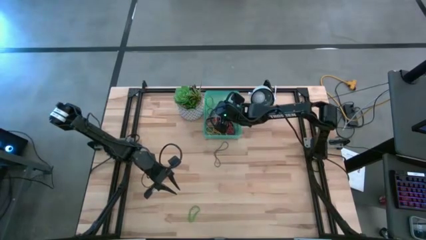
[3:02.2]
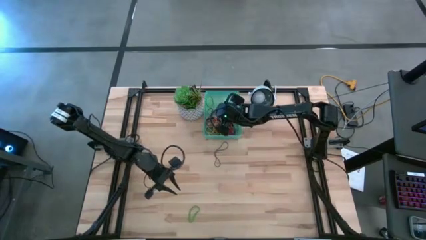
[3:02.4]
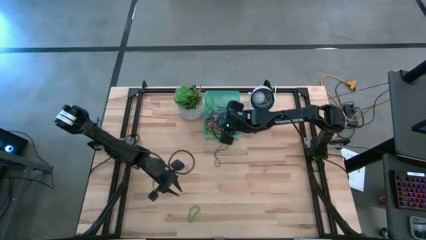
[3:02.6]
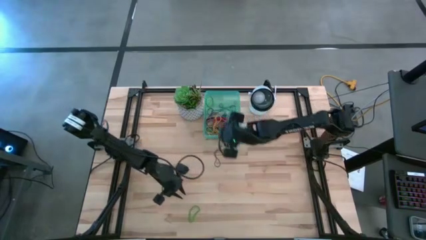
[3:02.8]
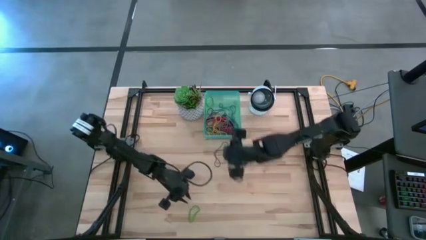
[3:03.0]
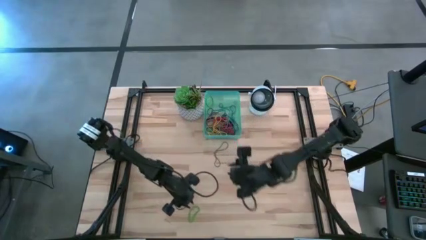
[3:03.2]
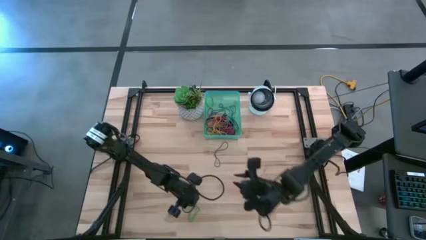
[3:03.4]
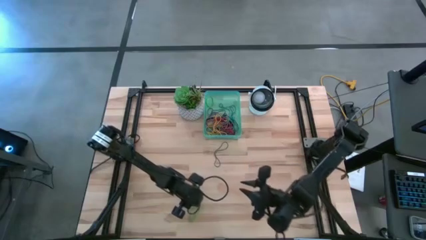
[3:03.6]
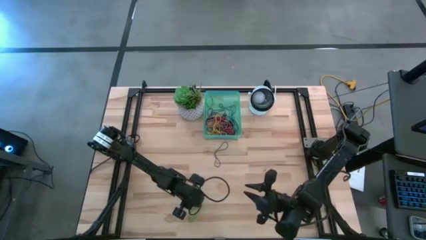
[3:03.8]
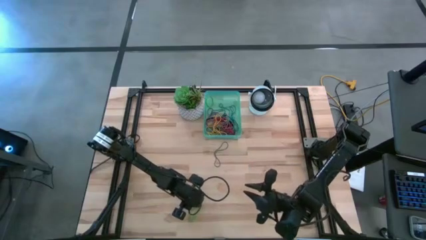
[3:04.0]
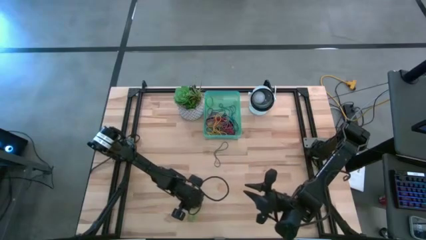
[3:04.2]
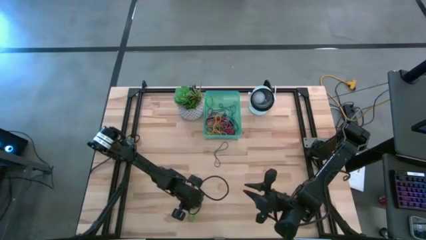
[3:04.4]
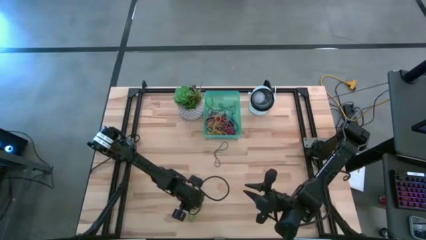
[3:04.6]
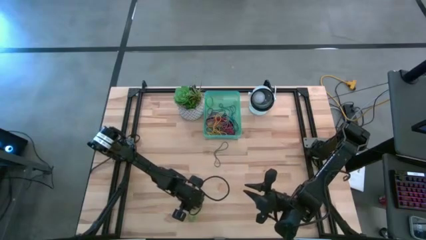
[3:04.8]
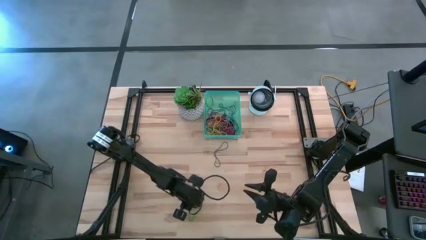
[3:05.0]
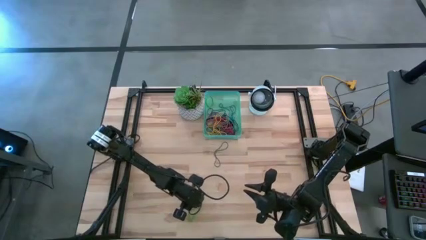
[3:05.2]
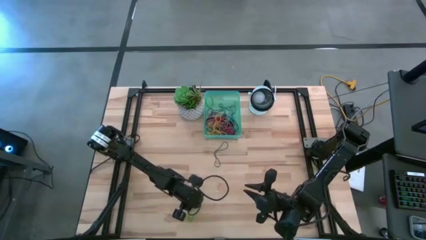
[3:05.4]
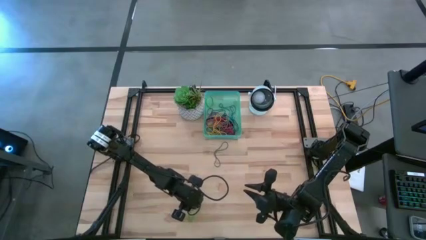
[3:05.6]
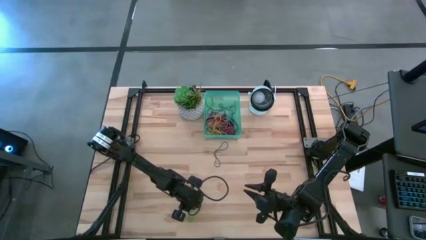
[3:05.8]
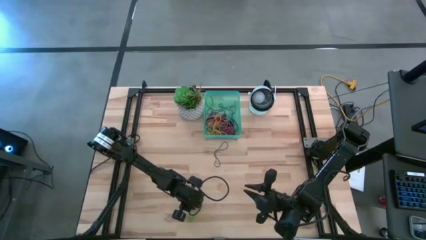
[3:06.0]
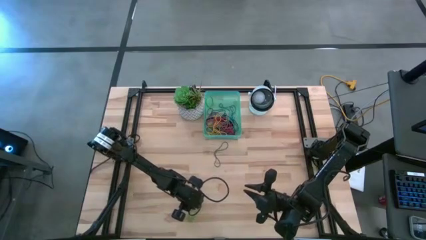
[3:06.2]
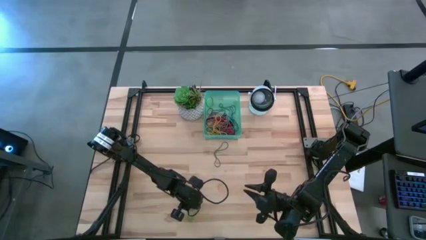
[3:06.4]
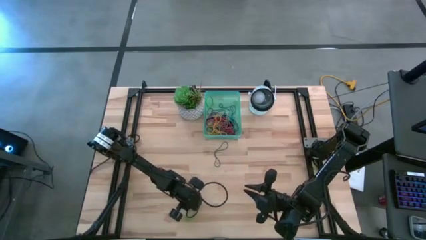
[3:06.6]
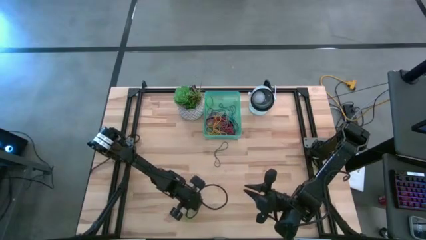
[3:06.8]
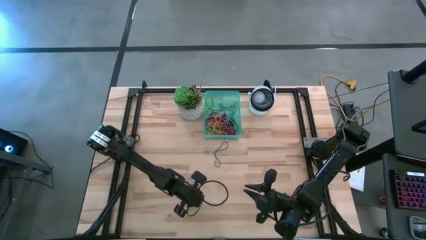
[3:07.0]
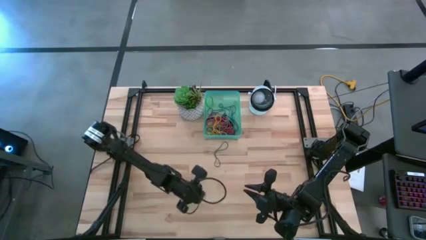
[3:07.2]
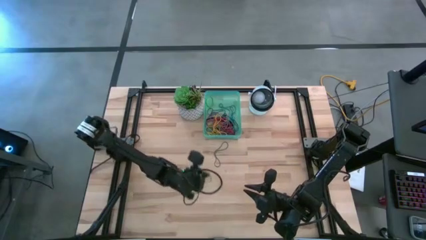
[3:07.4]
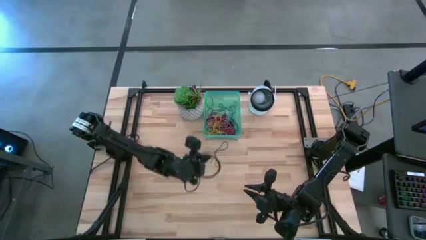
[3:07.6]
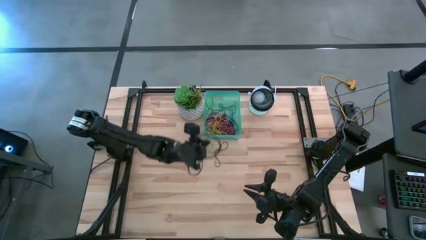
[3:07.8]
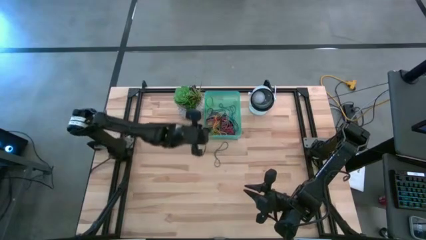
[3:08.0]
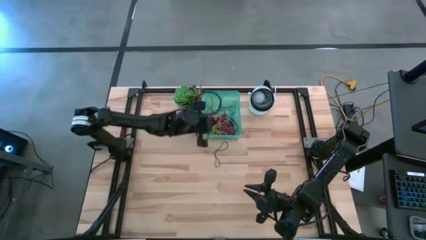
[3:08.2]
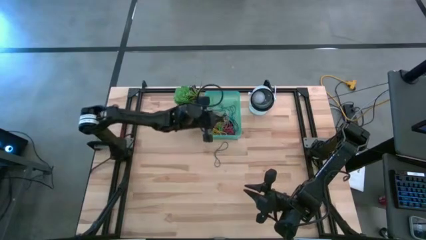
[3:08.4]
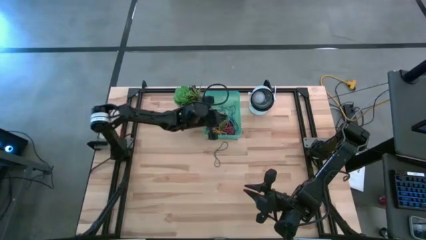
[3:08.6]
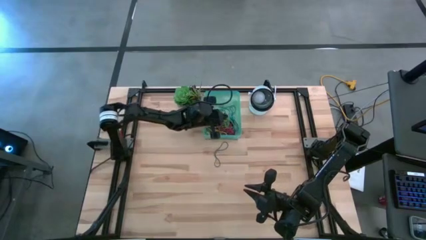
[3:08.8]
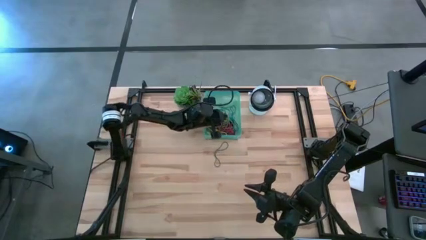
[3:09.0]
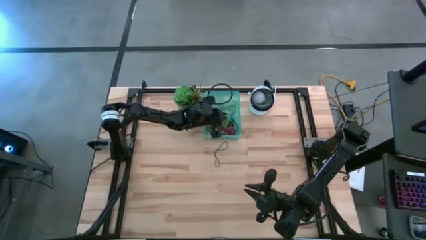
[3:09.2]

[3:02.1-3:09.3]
Task: Pick and place rubber bands into bin
Put the green rubber band into the green bin

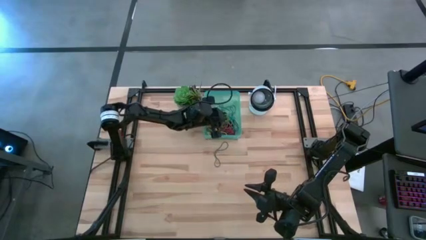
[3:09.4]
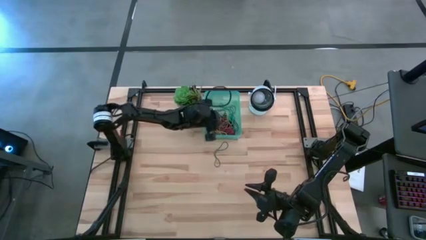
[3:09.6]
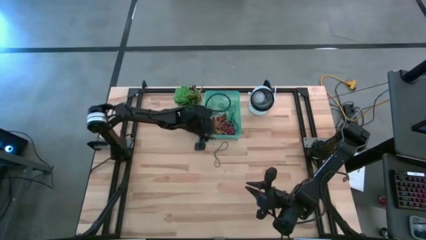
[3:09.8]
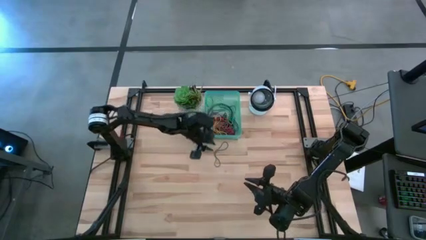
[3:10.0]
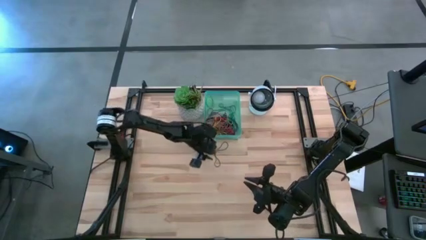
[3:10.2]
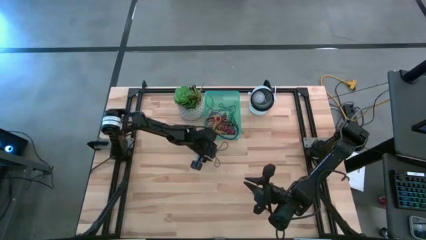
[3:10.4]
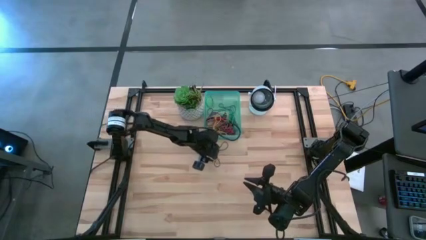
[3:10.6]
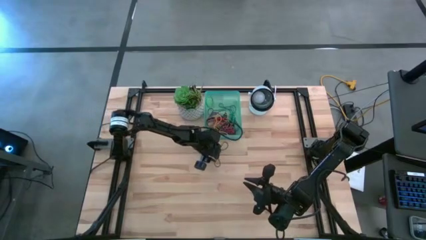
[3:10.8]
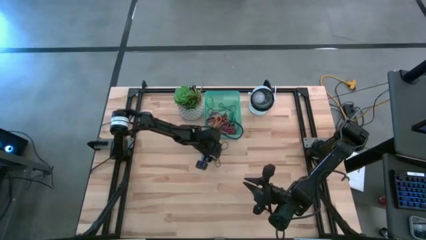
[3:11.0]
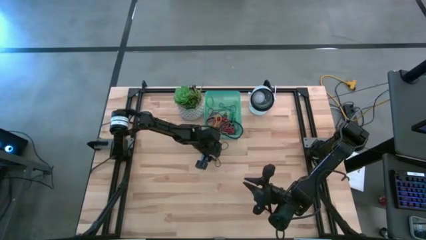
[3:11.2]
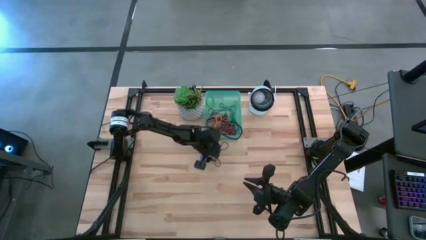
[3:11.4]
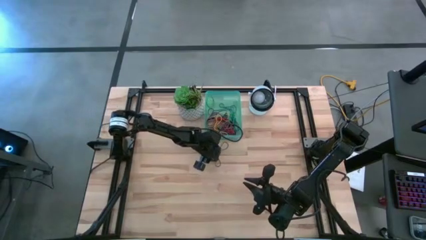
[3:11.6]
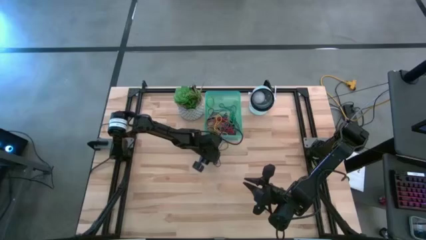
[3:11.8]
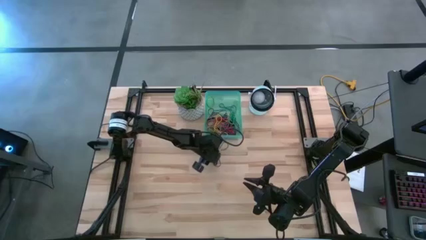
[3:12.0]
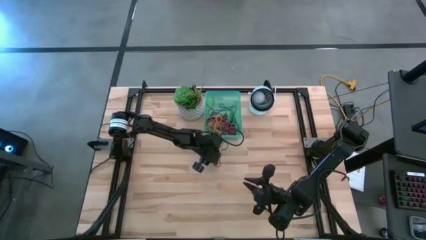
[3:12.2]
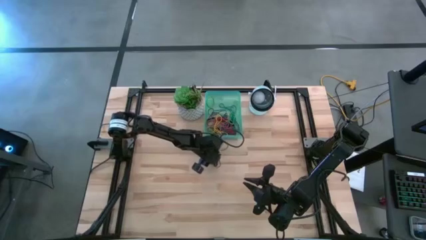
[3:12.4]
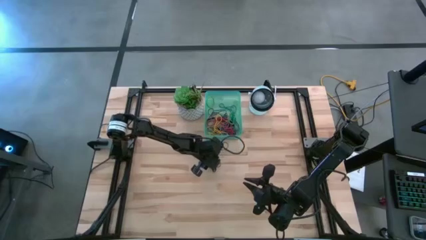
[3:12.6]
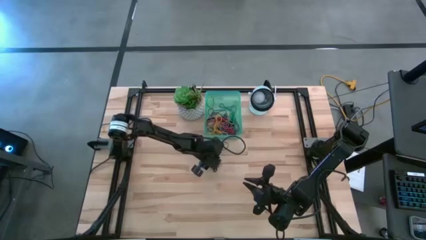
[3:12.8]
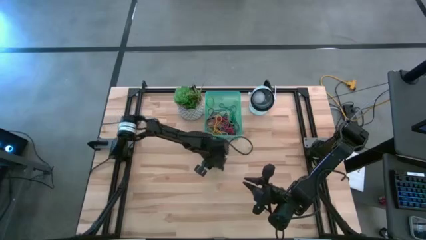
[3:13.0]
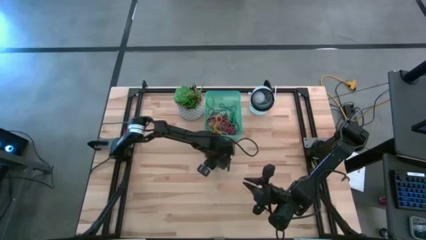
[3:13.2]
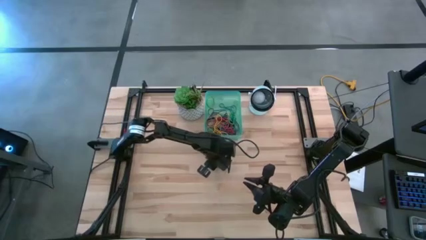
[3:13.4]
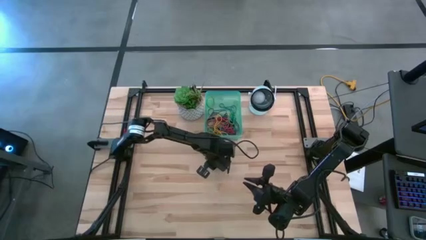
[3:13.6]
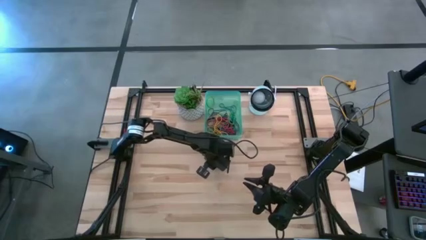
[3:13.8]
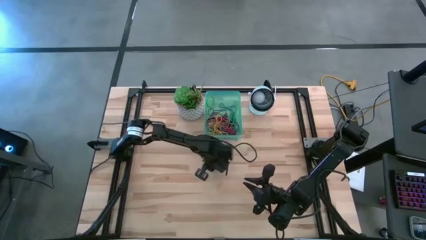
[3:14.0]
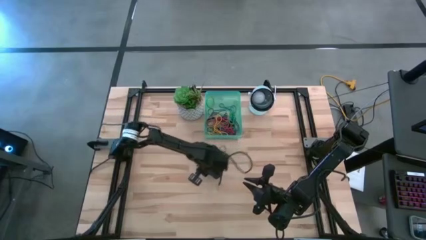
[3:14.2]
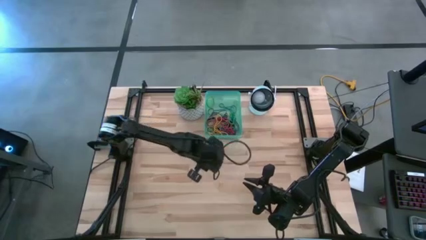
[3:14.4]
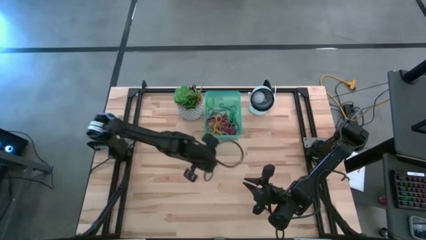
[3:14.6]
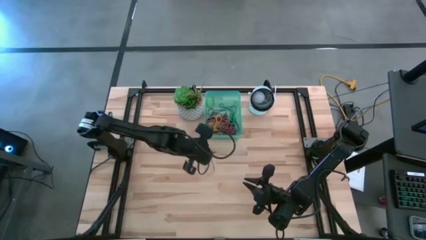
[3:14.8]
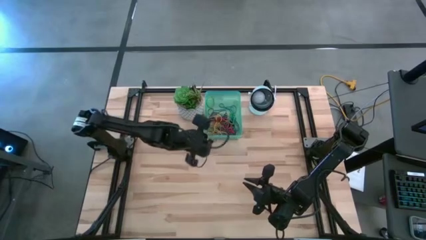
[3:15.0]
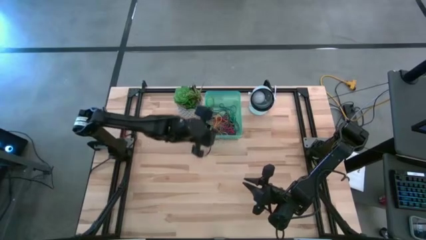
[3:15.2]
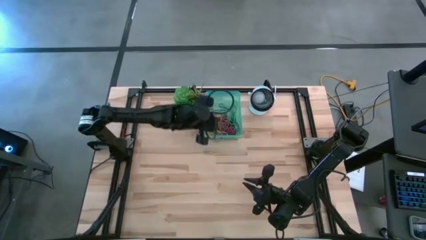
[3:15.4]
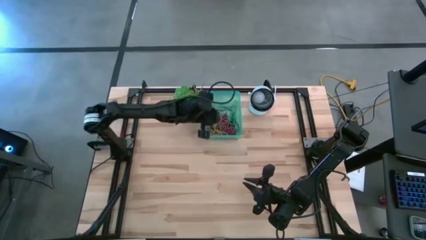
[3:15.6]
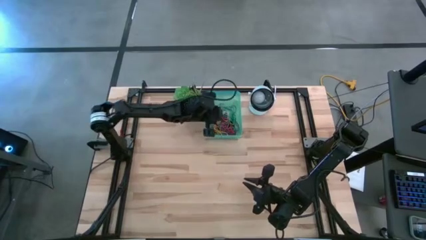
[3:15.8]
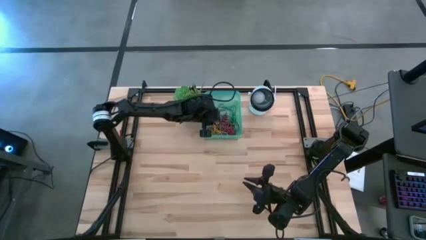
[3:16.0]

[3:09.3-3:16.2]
Put the violet rubber band into the green bin

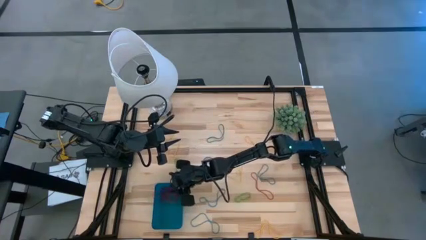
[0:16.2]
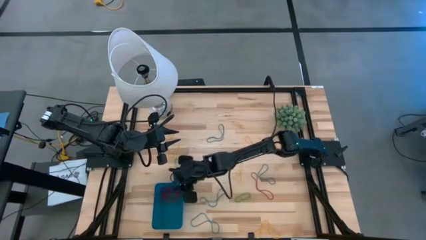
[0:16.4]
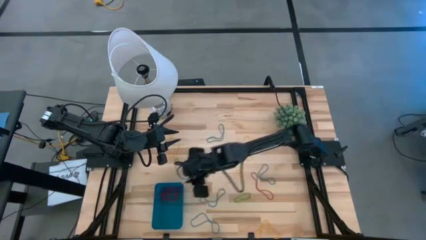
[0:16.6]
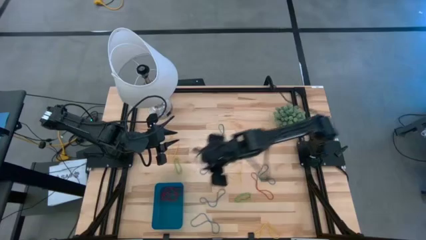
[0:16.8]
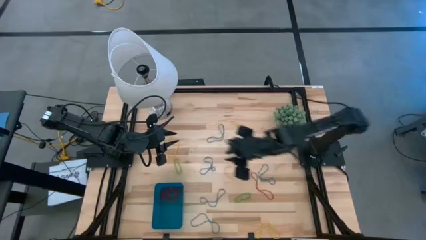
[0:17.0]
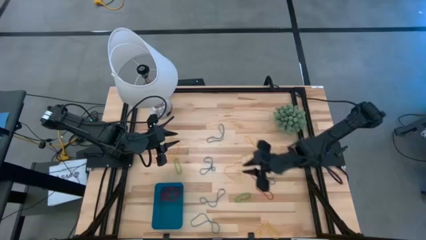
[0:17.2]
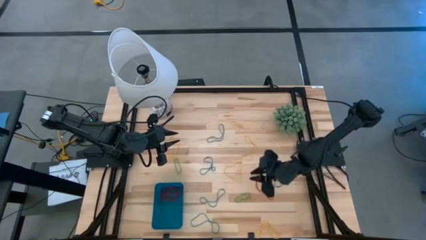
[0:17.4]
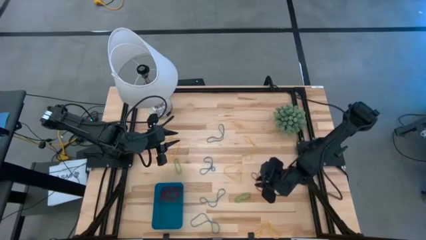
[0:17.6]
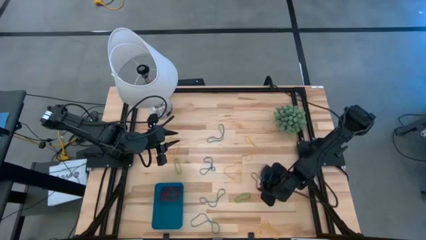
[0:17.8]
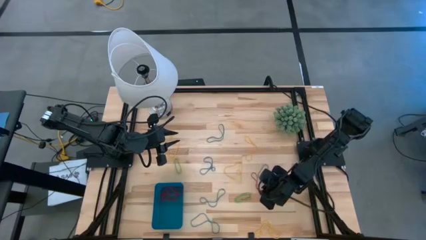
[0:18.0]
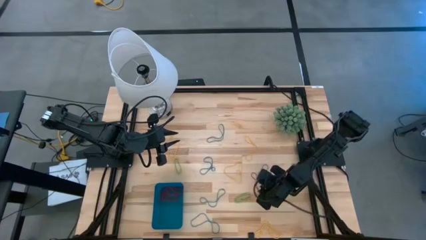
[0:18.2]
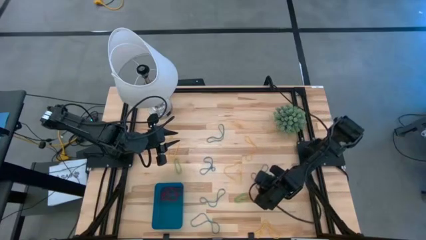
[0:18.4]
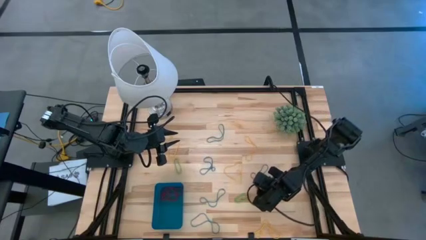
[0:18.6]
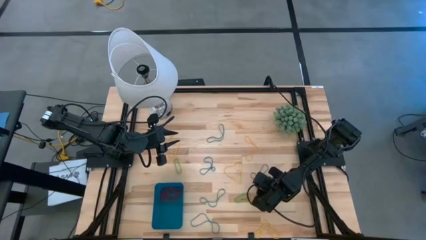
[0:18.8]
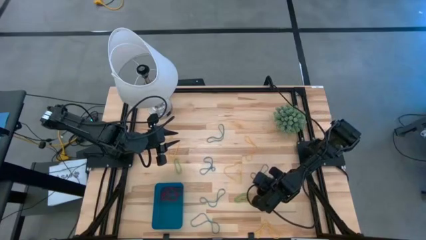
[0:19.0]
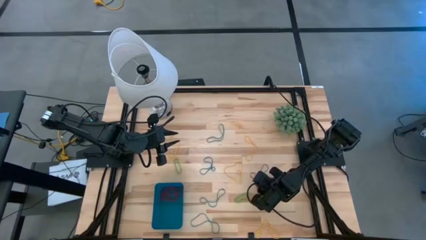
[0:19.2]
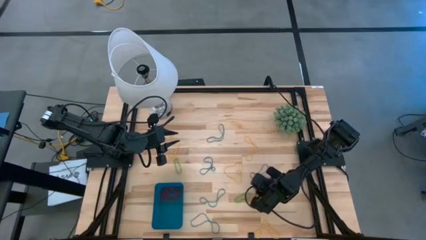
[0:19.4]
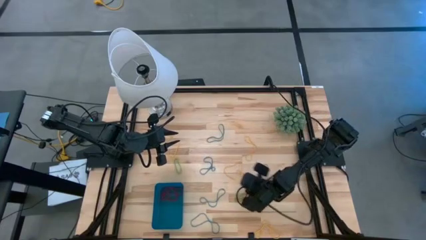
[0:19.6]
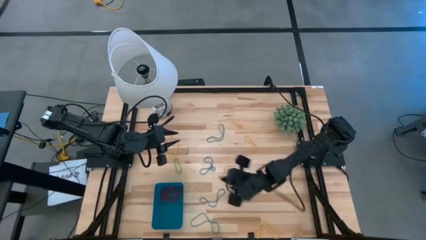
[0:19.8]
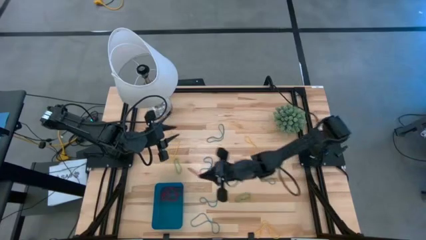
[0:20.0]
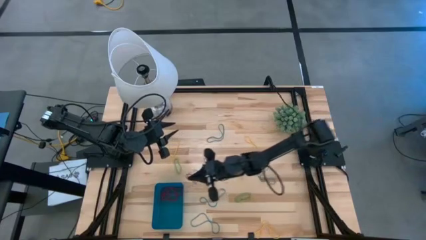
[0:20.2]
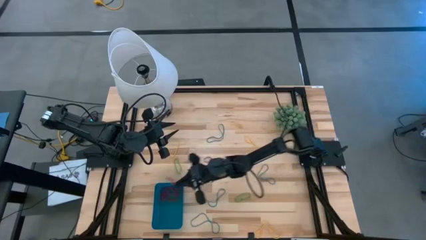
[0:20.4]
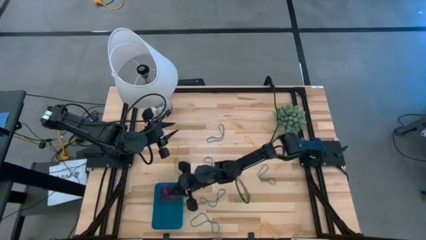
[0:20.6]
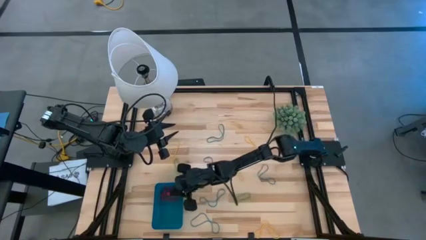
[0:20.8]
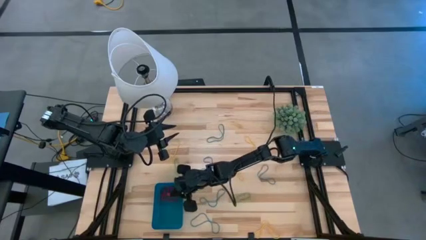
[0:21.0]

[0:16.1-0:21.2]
Task: Pick and place items into bin
Put the red rubber band into the blue bin
